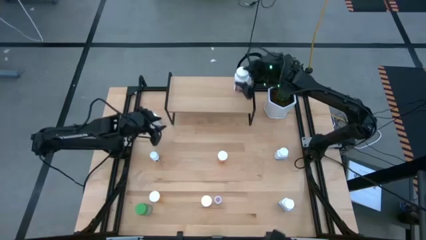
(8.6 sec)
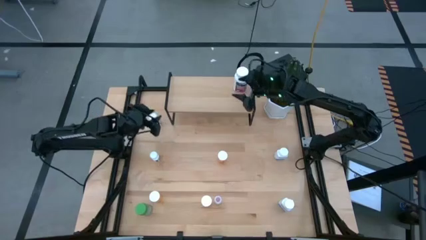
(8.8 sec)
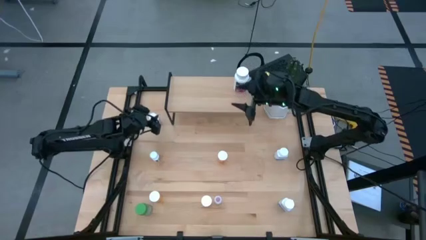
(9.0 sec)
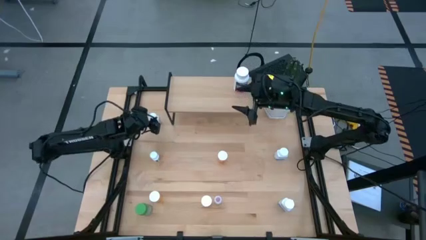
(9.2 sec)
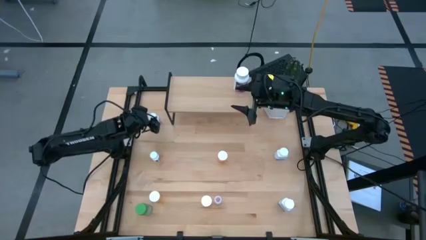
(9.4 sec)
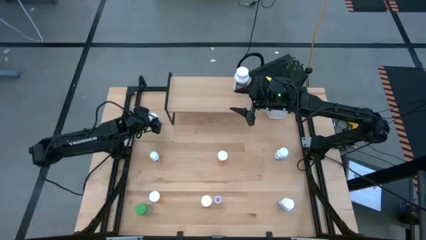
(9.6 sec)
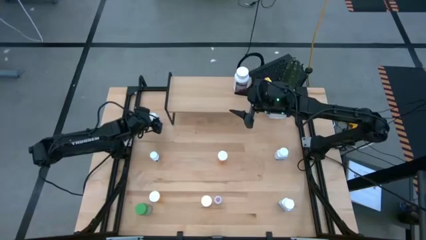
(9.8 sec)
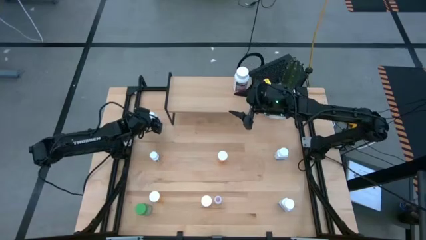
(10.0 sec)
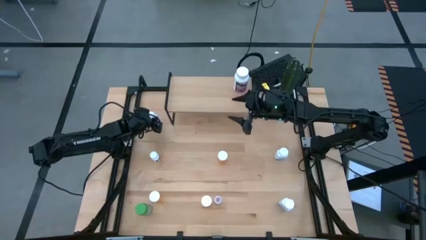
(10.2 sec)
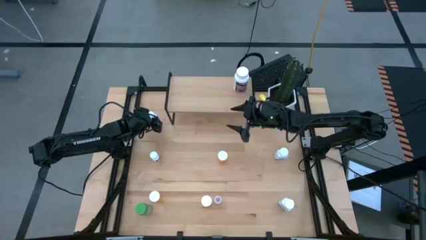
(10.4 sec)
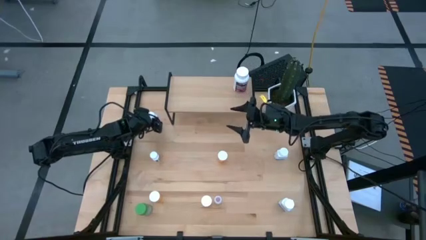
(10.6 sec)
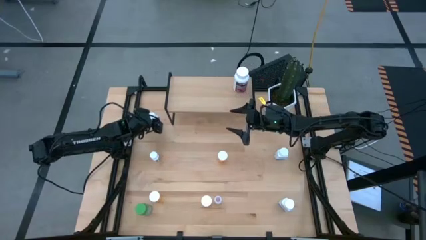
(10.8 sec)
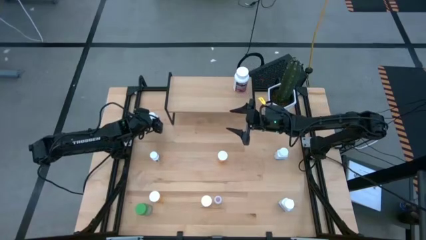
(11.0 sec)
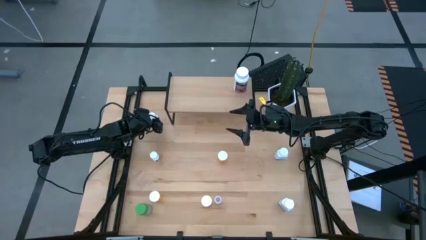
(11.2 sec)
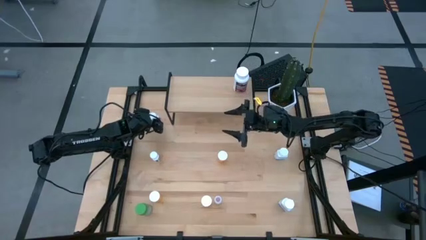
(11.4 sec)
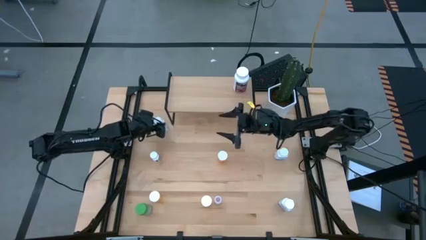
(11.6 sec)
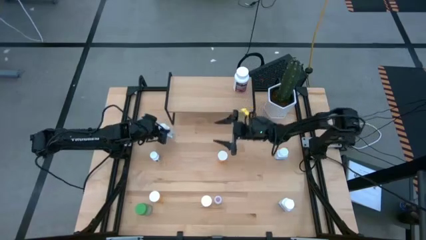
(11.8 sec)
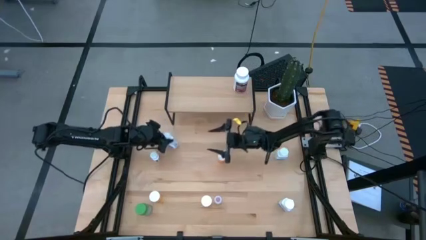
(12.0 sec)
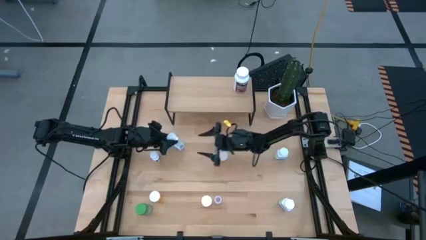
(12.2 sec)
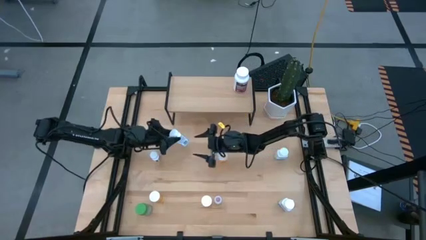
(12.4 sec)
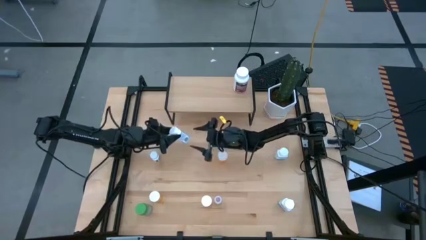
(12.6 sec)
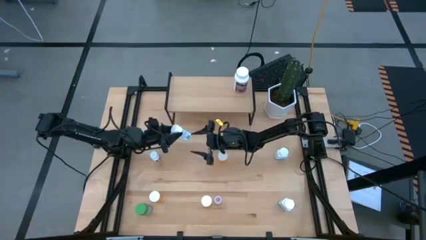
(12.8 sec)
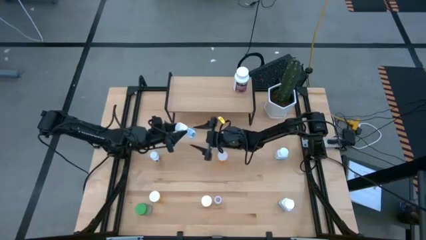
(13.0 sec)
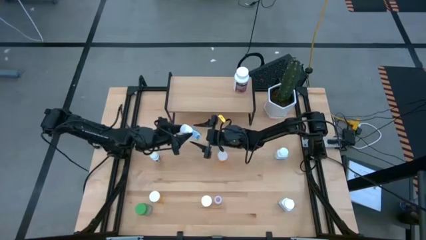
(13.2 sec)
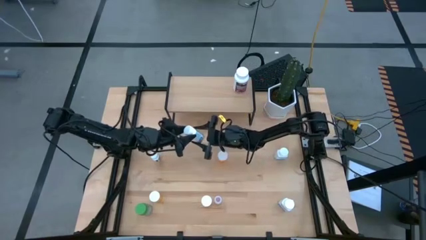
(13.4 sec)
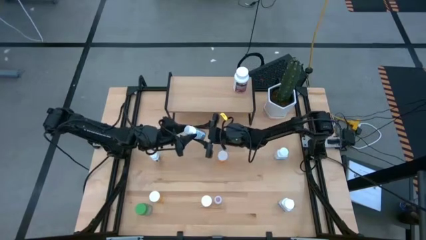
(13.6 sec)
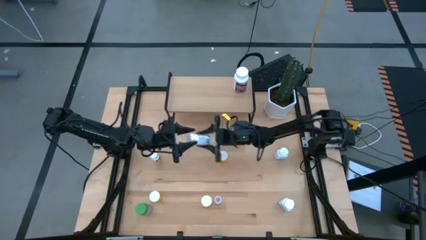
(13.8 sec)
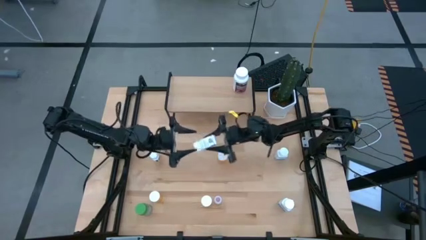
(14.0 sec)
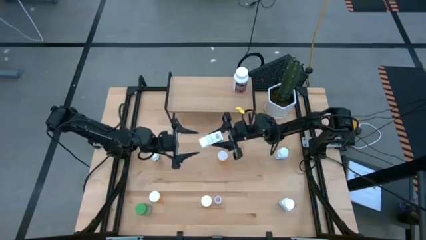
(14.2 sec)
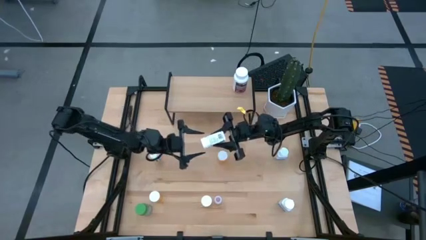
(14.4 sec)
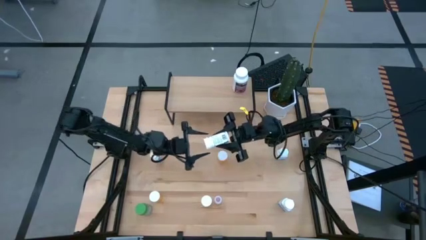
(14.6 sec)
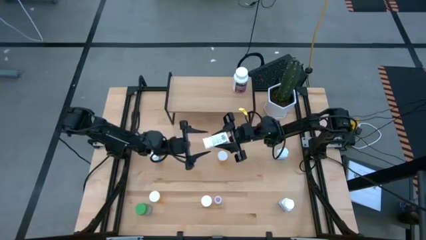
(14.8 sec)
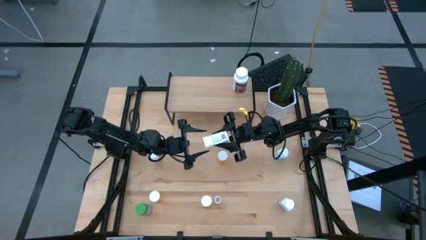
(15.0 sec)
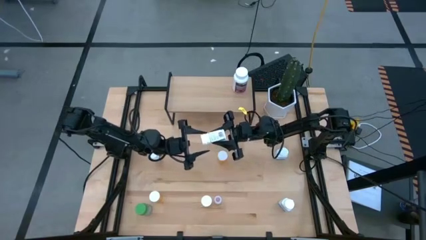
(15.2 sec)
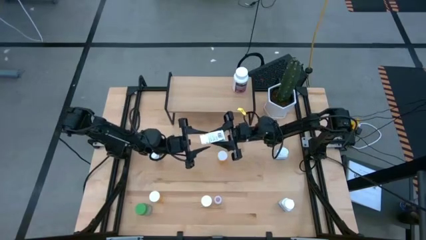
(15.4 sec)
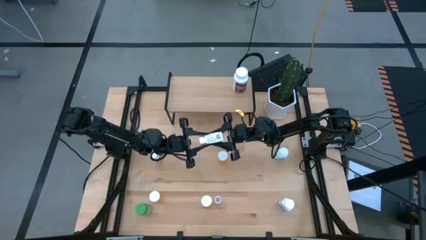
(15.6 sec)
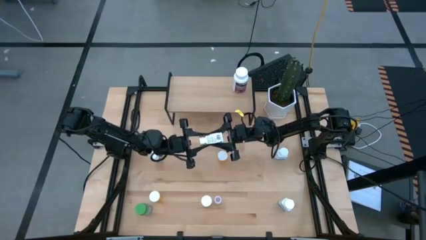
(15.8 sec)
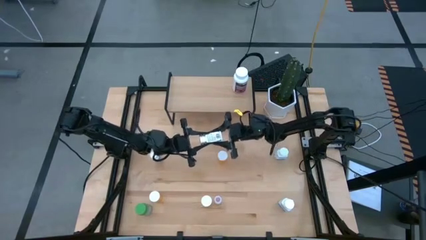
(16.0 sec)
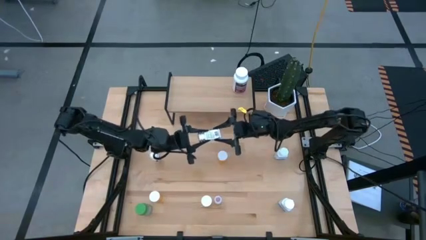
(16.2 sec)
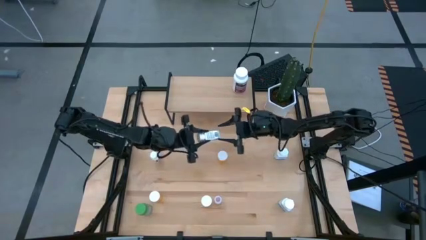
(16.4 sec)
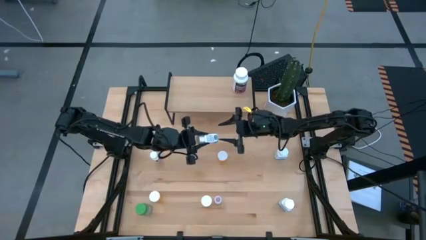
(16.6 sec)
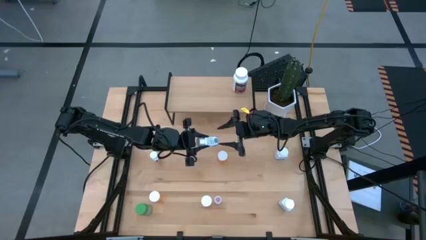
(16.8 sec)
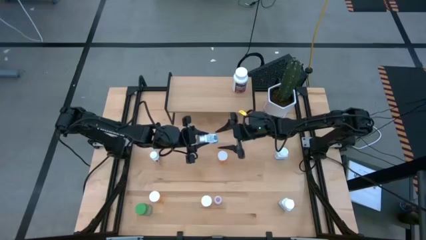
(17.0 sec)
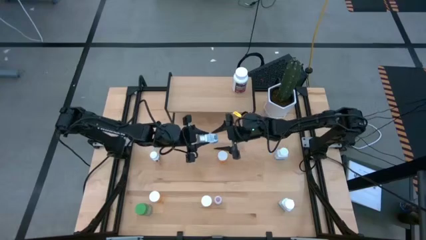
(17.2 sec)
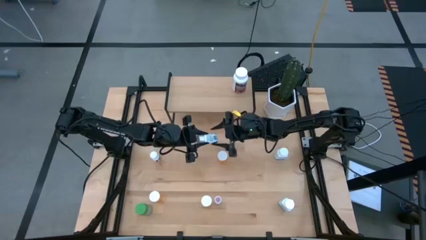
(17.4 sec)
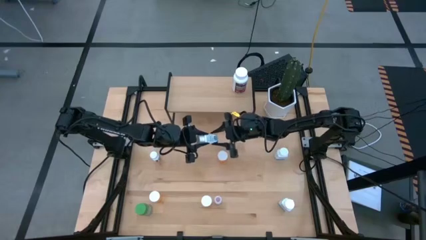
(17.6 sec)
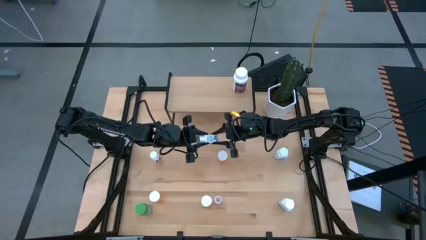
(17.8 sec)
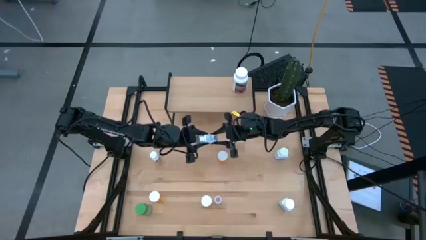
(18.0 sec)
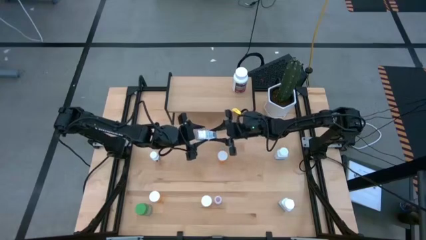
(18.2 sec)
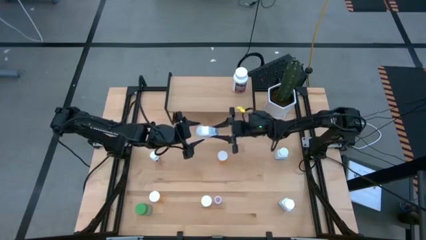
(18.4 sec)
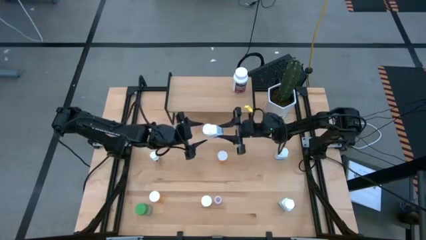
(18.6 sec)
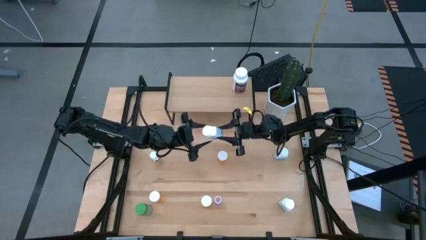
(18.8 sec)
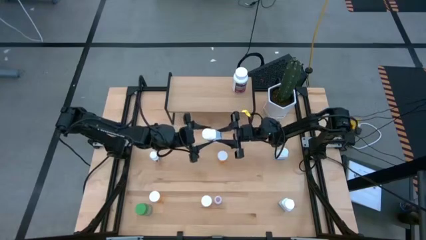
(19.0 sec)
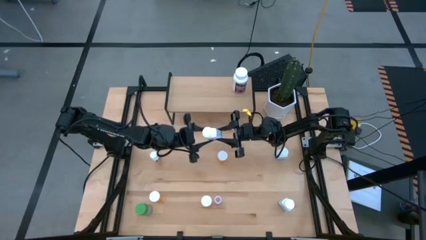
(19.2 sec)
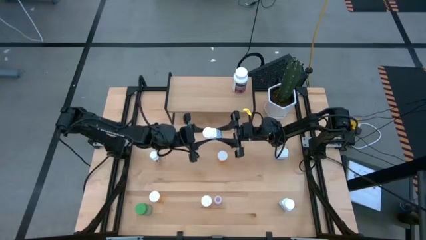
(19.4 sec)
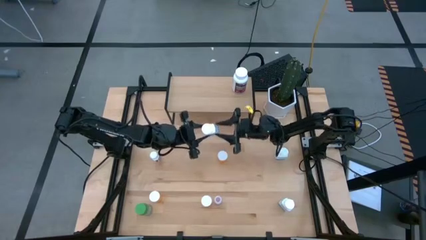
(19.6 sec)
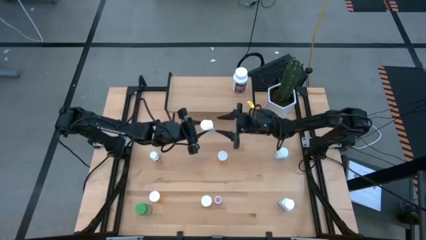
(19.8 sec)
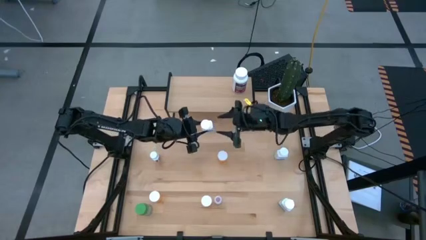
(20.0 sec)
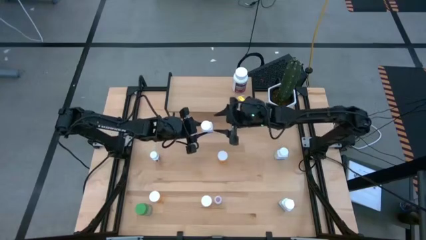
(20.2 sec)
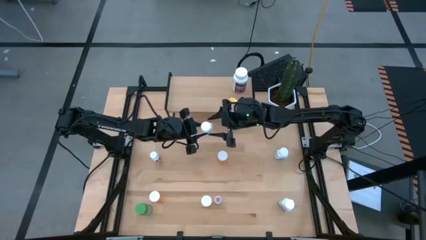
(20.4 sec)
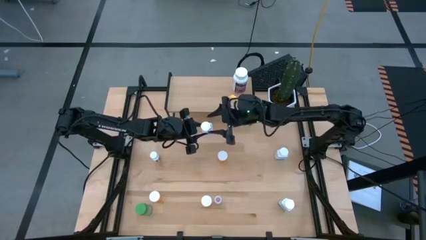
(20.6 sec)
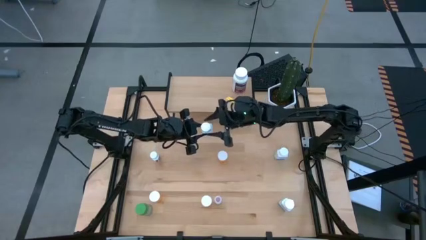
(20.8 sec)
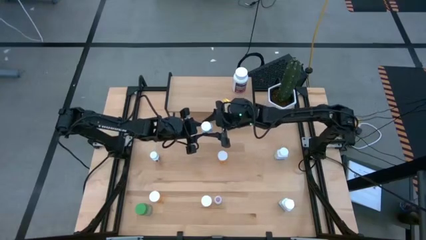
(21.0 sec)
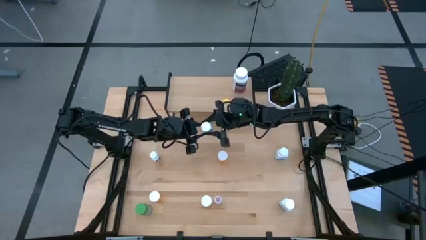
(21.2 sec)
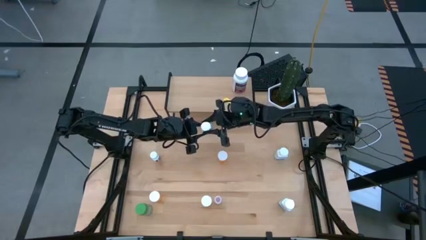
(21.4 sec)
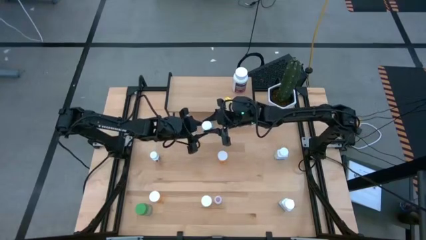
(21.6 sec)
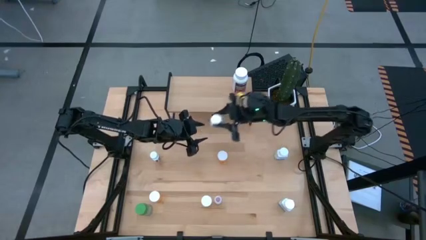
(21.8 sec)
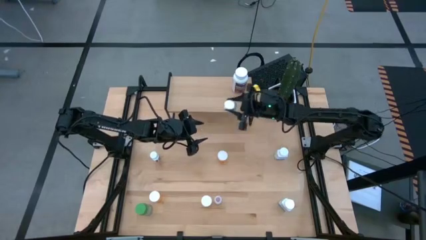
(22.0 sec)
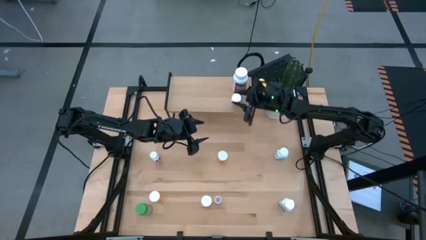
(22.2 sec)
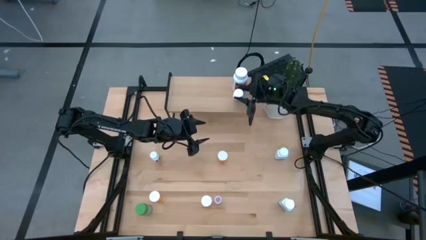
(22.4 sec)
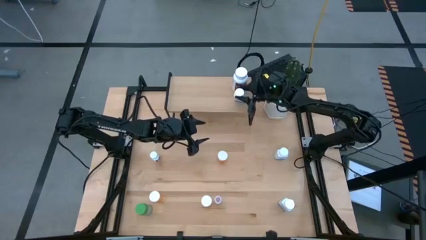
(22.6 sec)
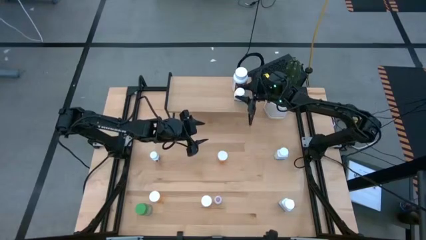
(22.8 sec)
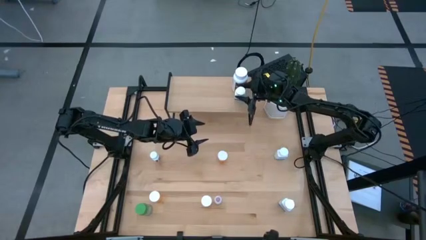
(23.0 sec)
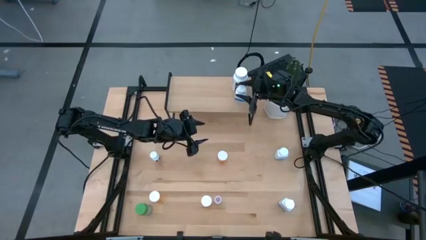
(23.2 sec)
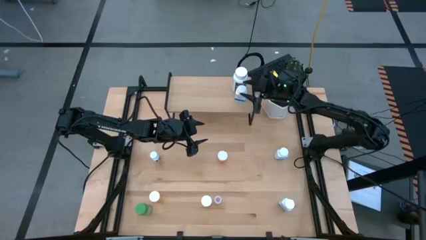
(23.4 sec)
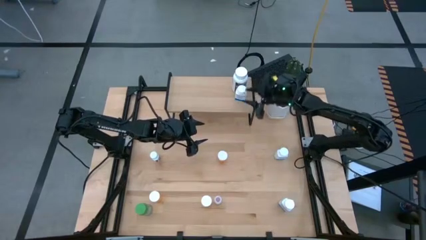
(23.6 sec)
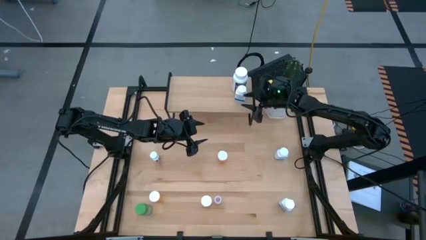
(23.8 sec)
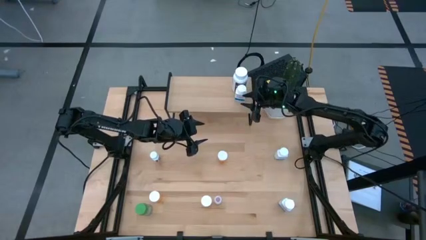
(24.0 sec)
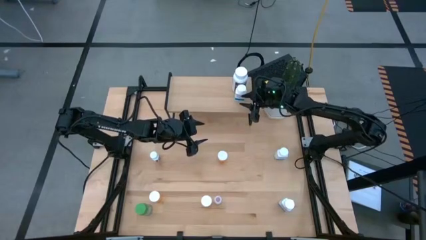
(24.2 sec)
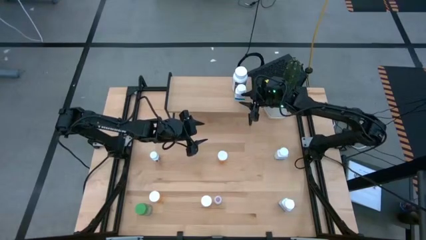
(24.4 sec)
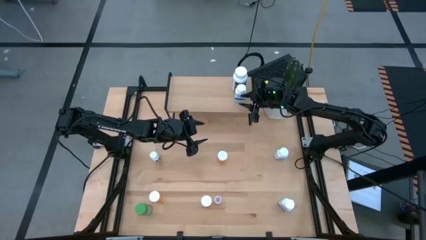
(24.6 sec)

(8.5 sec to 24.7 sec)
Task: Pick and place medicine bottles onto shelf by color
Put the top left white blue pill bottle on the shelf
